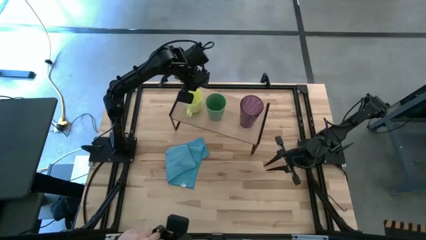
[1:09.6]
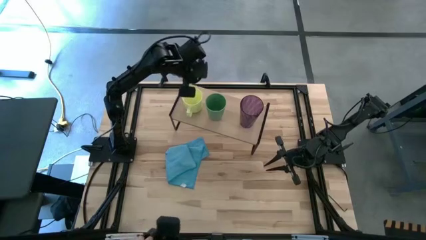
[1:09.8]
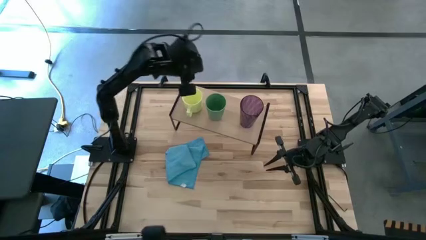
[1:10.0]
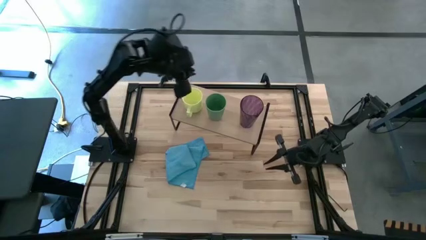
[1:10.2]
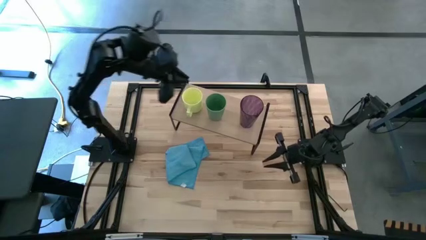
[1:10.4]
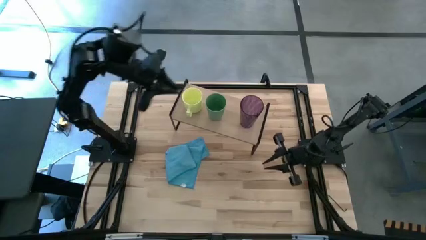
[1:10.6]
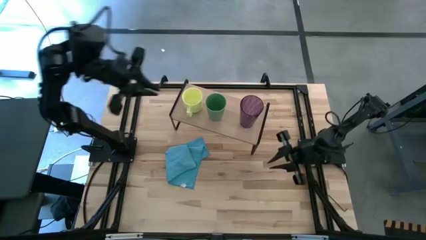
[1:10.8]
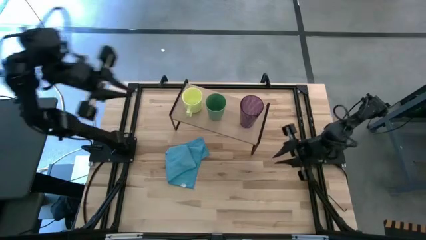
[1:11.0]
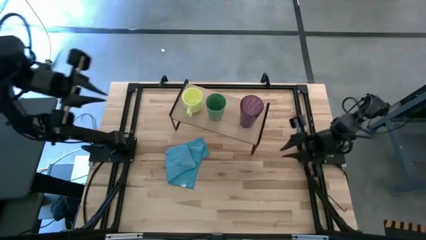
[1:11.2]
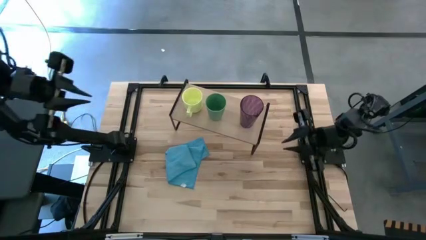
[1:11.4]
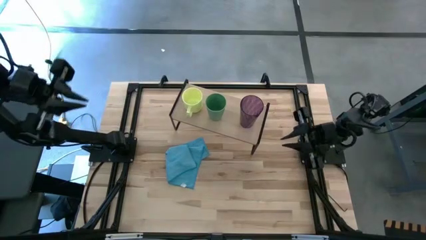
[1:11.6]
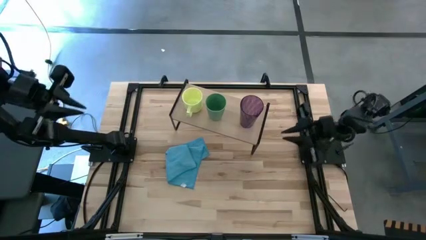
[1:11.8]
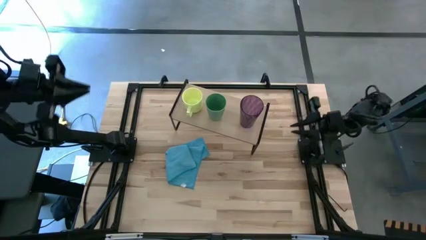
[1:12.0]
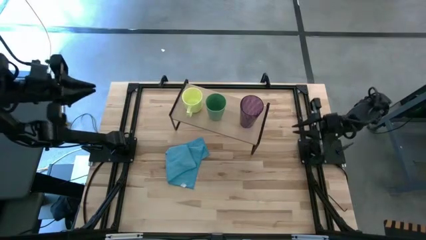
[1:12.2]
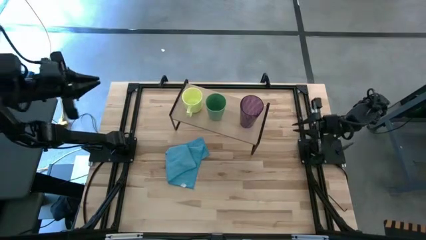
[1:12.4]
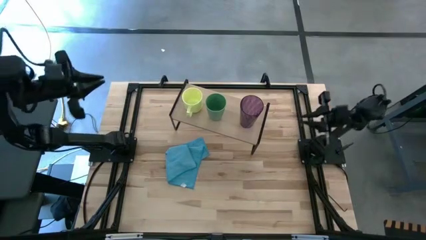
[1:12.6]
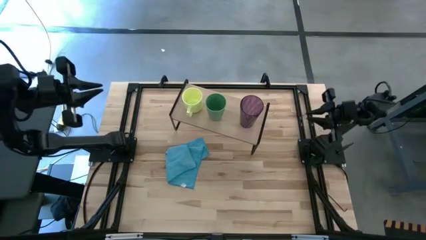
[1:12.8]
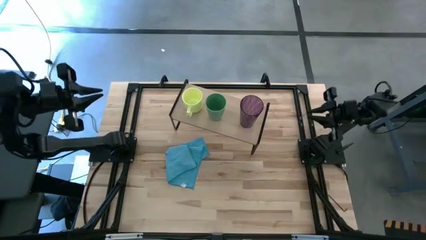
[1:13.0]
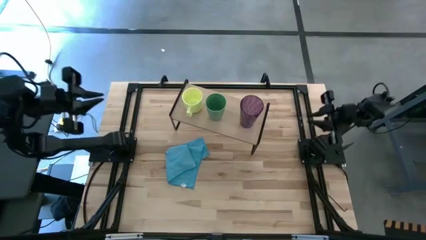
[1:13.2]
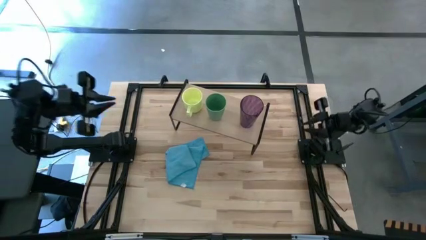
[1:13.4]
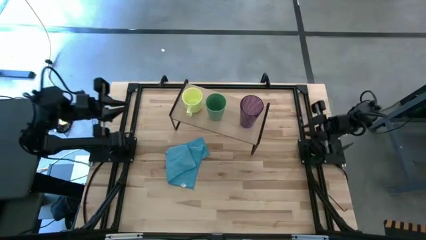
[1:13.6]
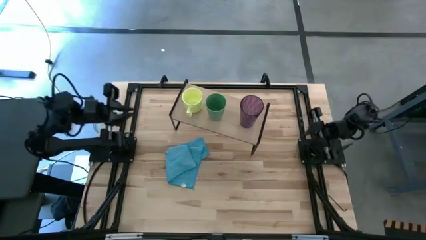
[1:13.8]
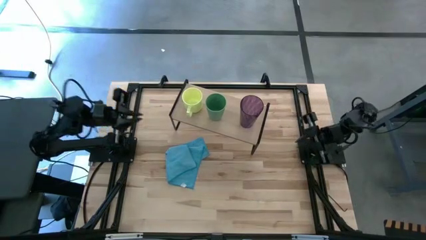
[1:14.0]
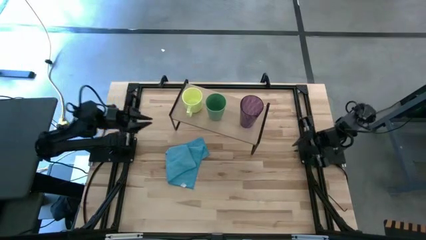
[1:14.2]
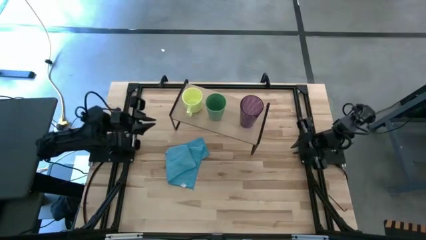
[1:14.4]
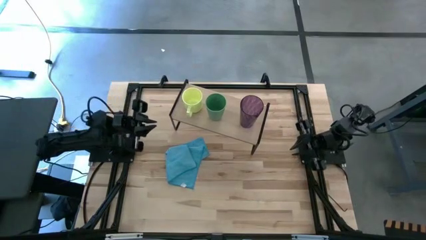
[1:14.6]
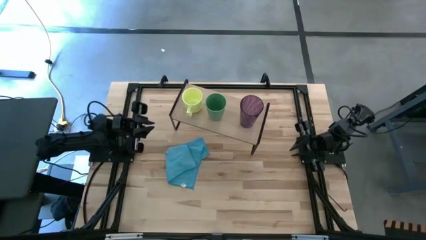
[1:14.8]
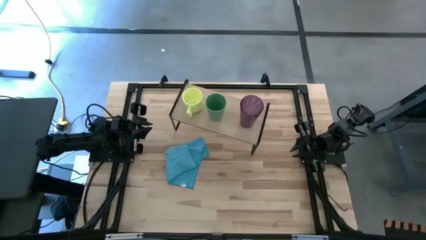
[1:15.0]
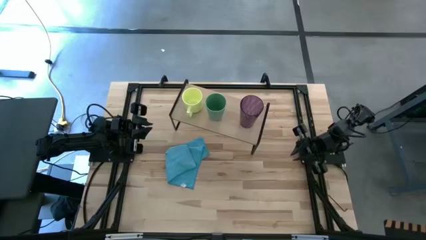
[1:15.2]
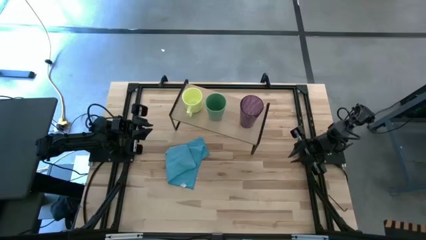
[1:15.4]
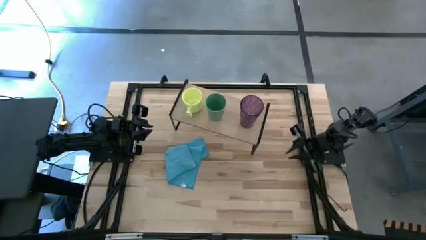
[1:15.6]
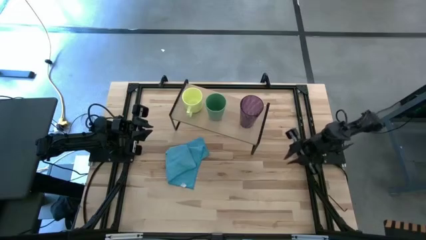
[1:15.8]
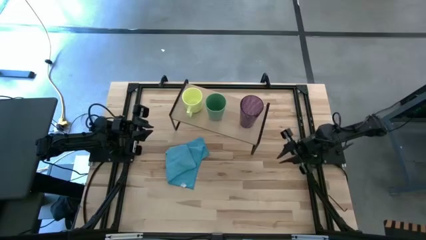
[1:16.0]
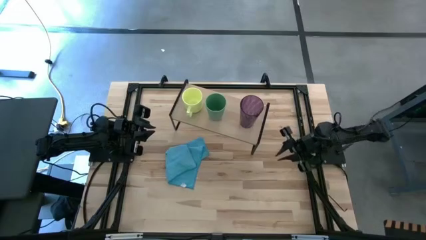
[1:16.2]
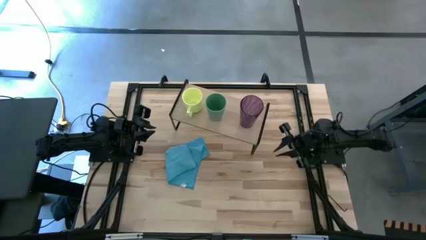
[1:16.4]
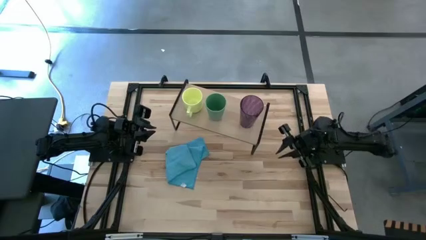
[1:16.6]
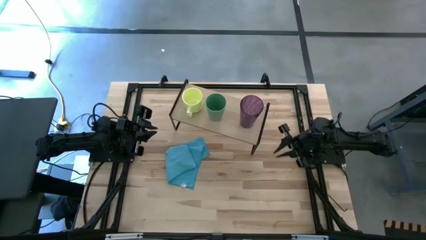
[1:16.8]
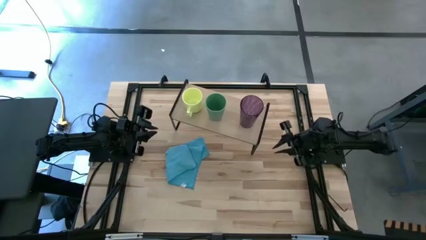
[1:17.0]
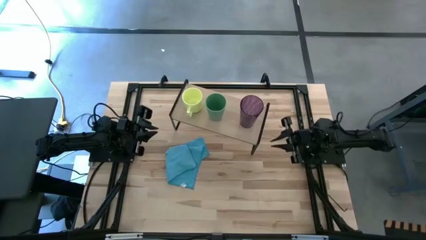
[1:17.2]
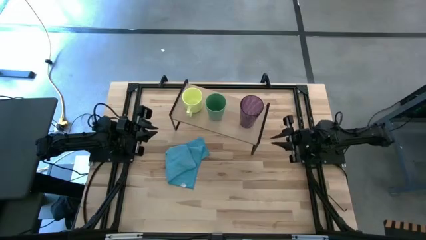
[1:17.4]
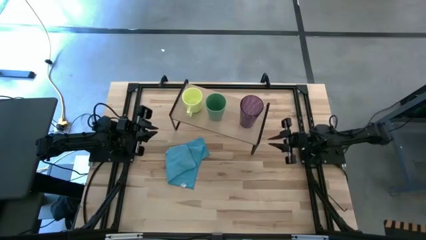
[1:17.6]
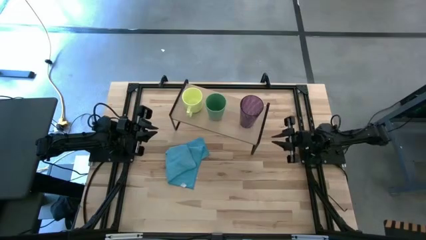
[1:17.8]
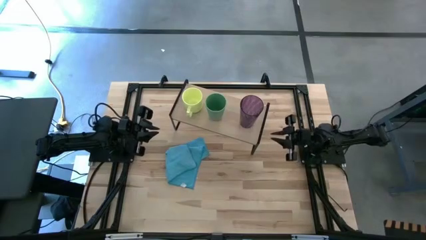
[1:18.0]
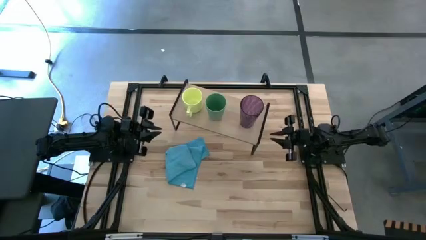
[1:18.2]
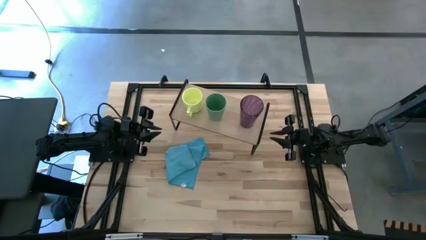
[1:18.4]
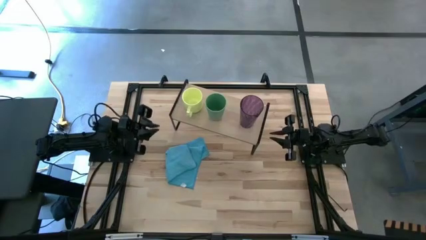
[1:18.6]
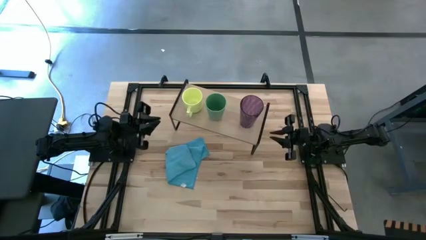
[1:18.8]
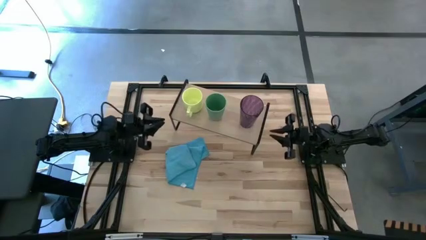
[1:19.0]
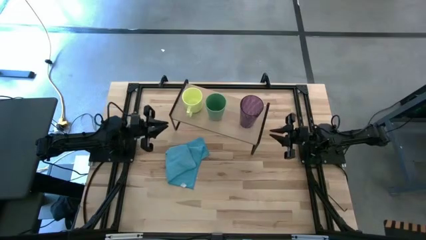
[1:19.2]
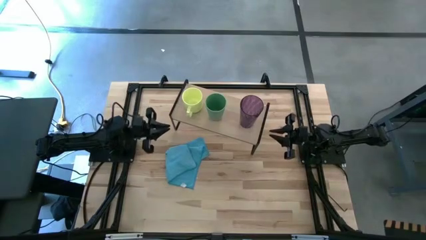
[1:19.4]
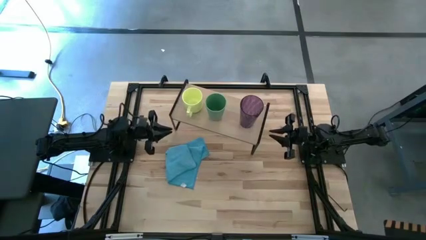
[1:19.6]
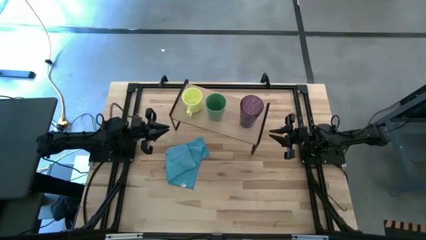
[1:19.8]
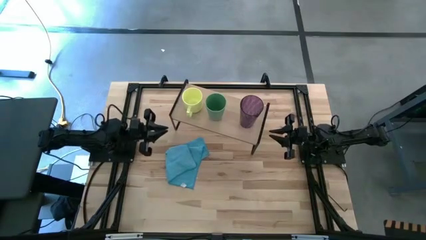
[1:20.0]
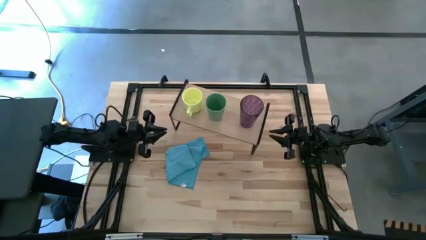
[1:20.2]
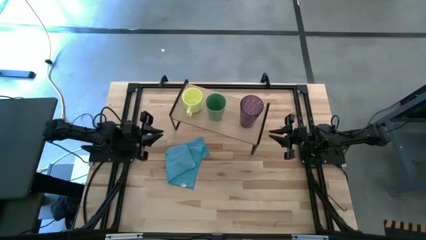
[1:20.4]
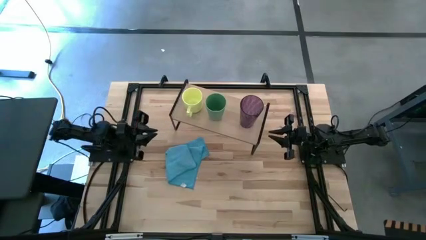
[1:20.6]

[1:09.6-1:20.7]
Task: Stack small to large cups/mugs on shelf
Return to Home Position
